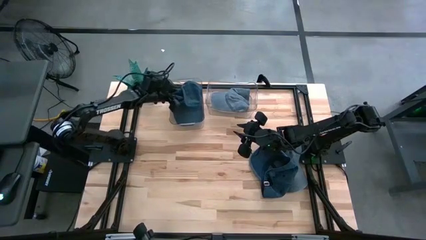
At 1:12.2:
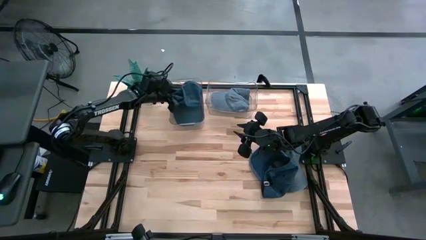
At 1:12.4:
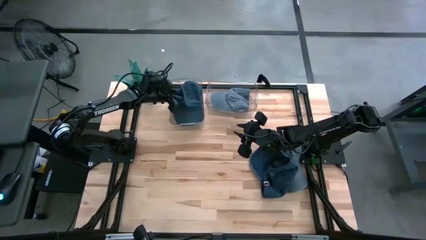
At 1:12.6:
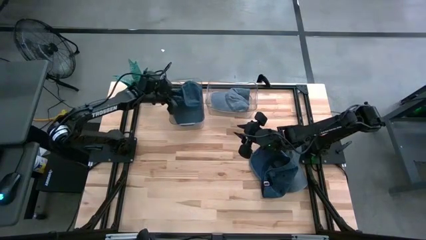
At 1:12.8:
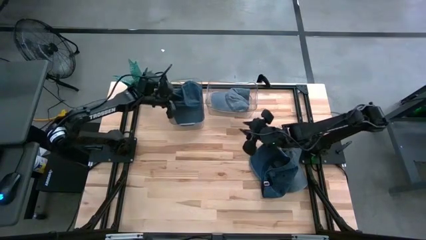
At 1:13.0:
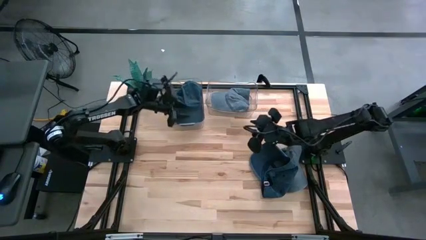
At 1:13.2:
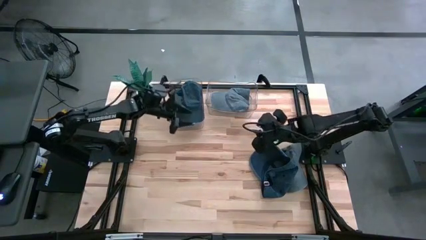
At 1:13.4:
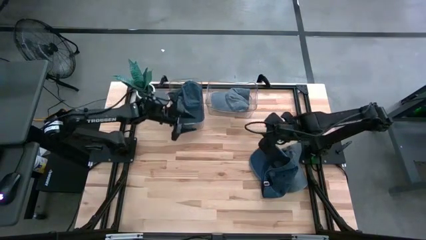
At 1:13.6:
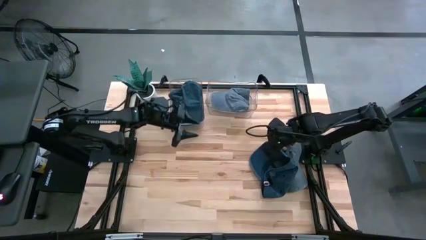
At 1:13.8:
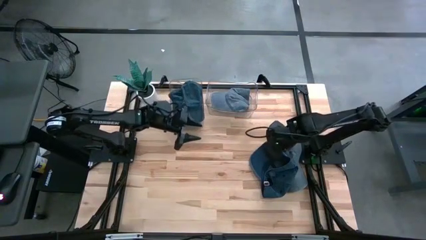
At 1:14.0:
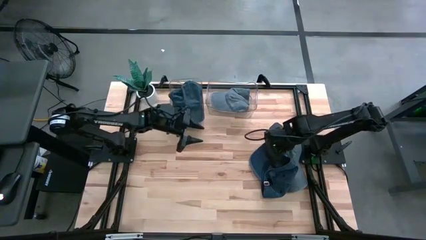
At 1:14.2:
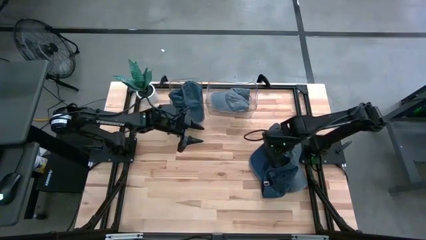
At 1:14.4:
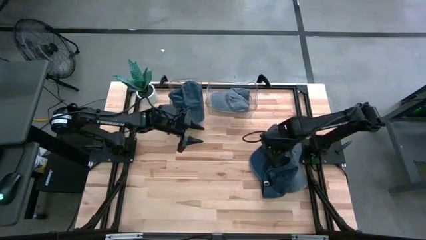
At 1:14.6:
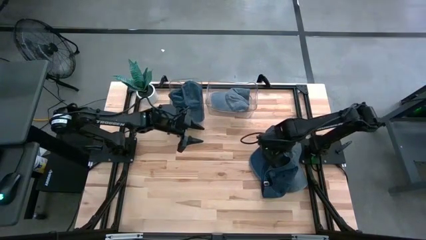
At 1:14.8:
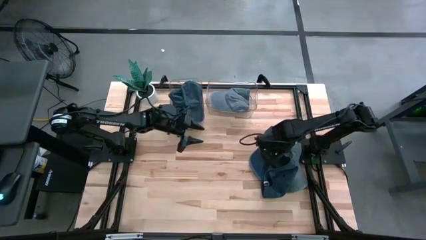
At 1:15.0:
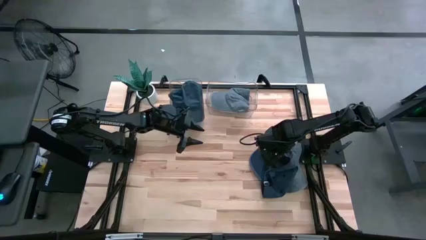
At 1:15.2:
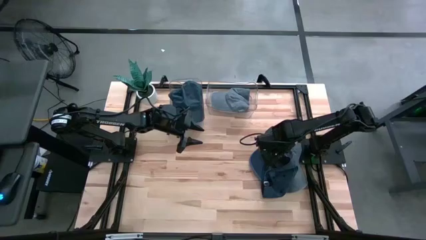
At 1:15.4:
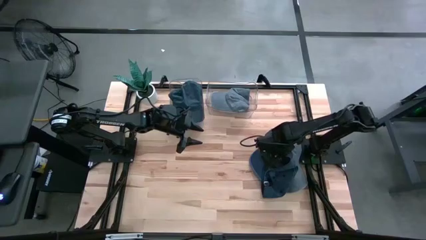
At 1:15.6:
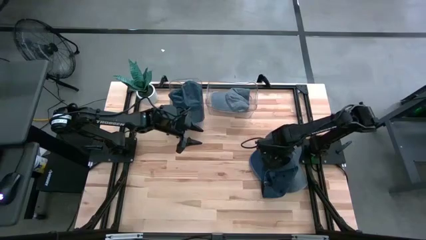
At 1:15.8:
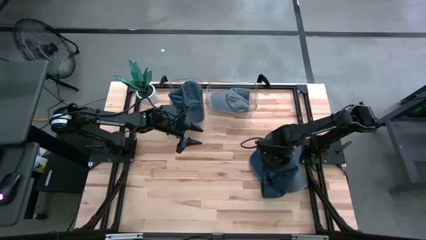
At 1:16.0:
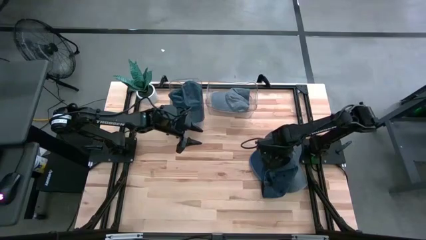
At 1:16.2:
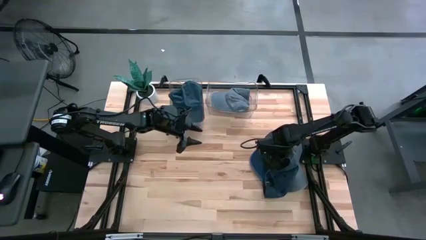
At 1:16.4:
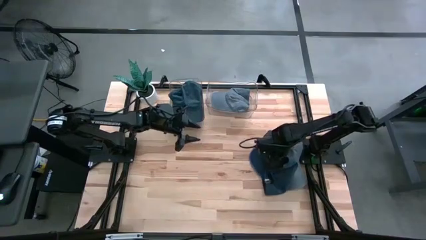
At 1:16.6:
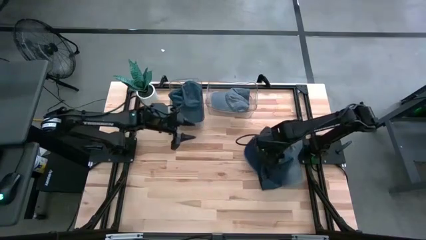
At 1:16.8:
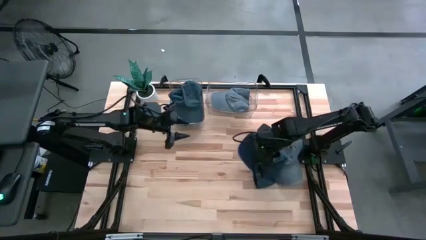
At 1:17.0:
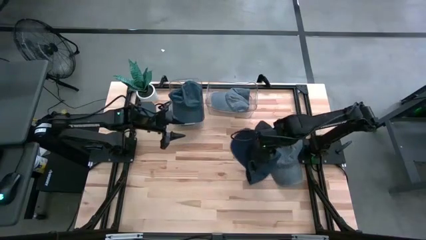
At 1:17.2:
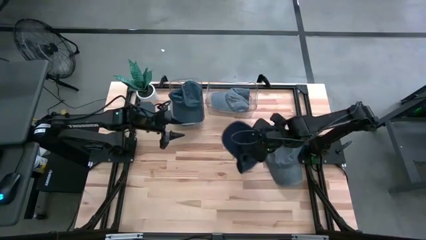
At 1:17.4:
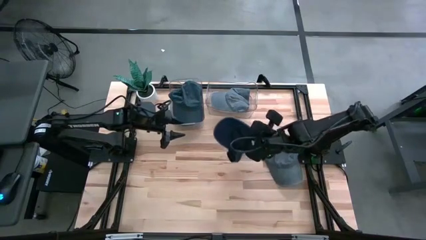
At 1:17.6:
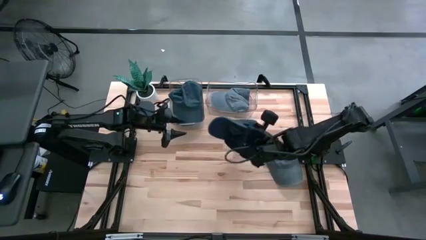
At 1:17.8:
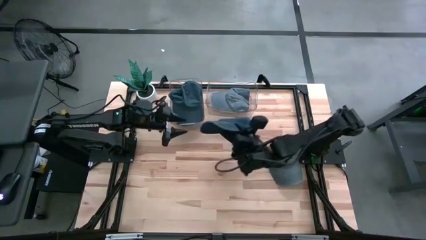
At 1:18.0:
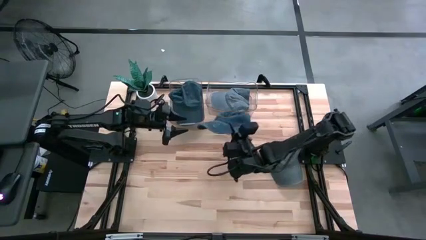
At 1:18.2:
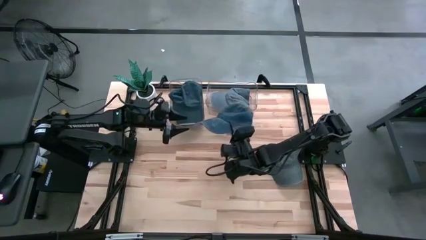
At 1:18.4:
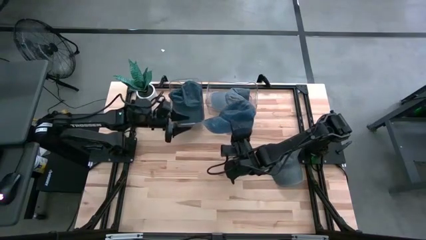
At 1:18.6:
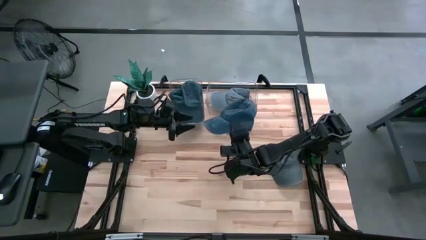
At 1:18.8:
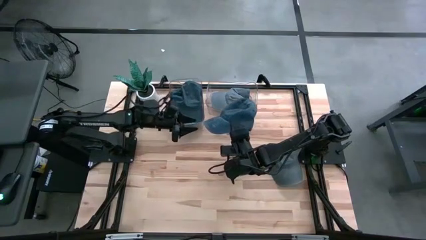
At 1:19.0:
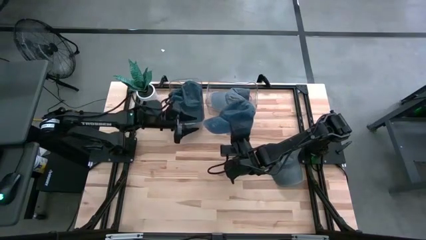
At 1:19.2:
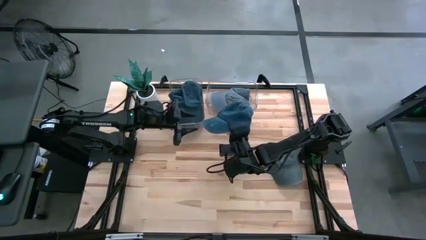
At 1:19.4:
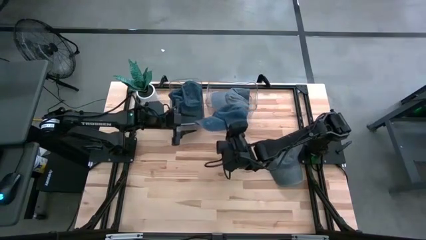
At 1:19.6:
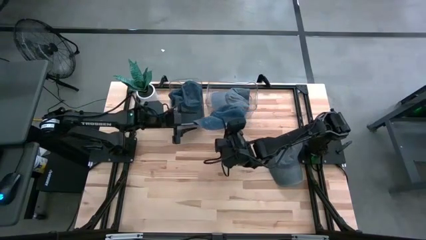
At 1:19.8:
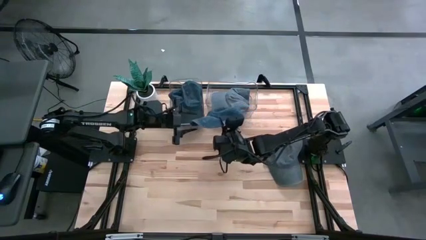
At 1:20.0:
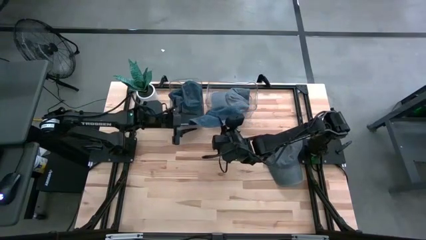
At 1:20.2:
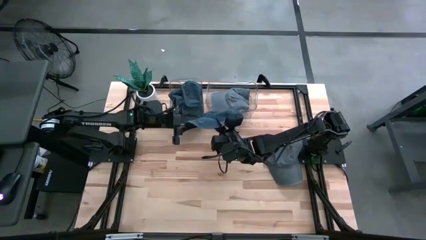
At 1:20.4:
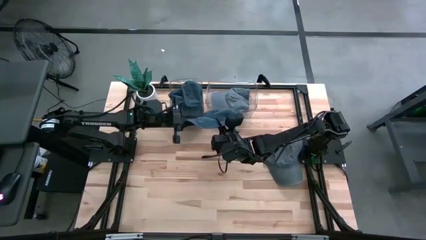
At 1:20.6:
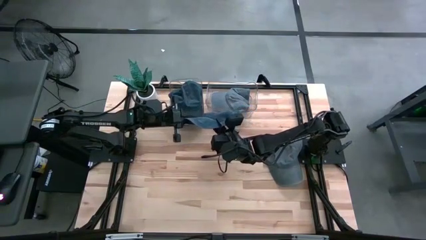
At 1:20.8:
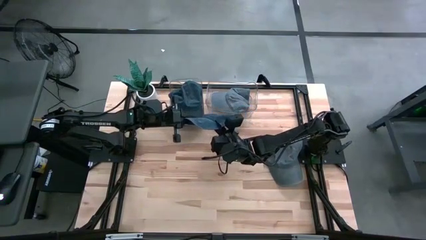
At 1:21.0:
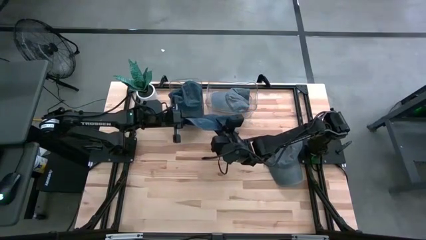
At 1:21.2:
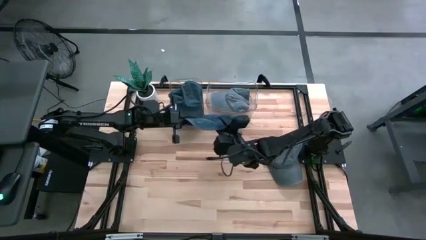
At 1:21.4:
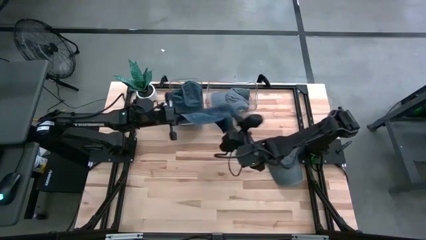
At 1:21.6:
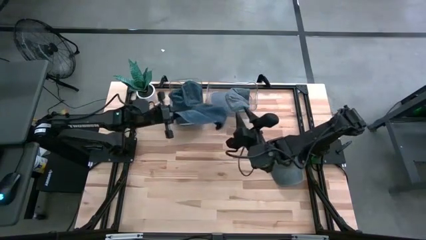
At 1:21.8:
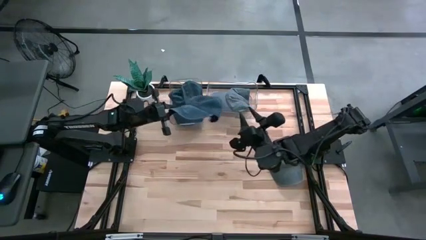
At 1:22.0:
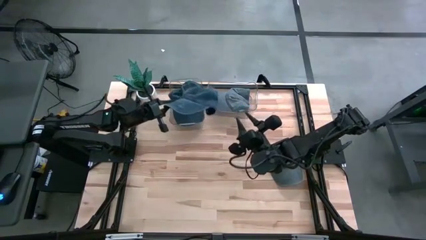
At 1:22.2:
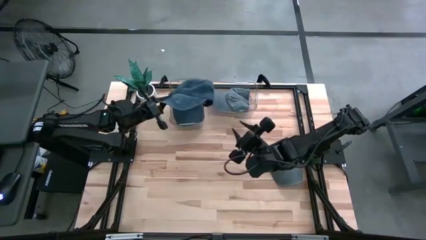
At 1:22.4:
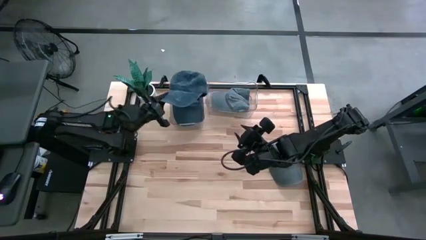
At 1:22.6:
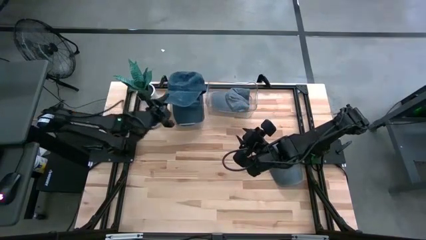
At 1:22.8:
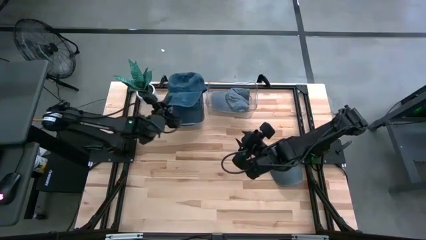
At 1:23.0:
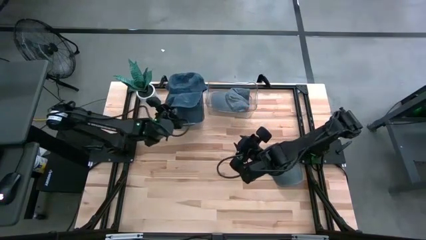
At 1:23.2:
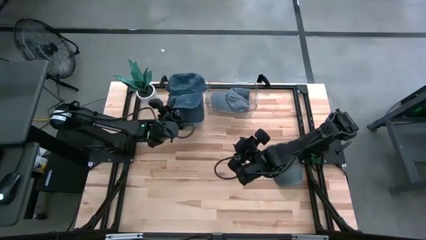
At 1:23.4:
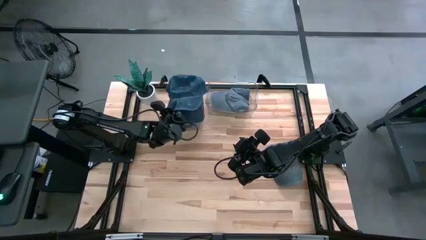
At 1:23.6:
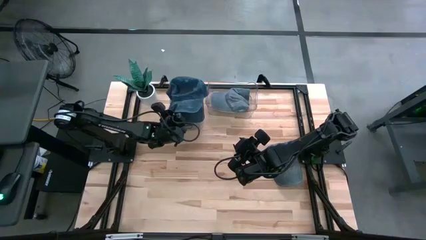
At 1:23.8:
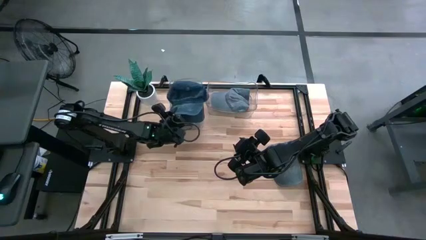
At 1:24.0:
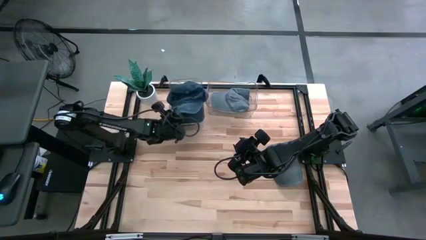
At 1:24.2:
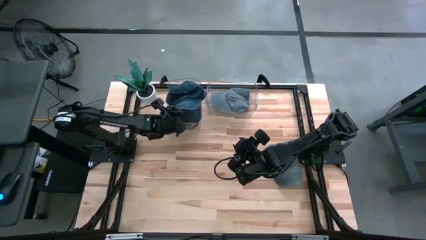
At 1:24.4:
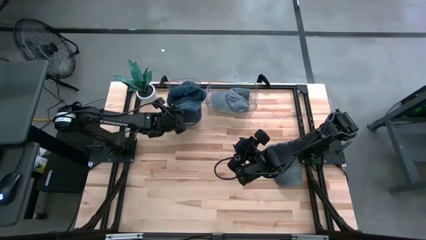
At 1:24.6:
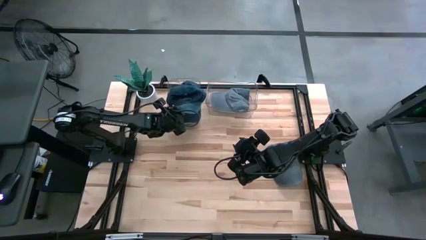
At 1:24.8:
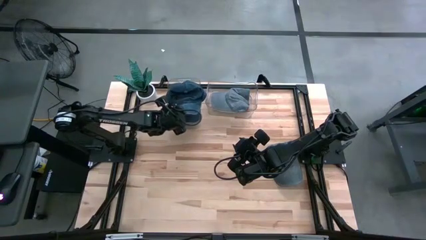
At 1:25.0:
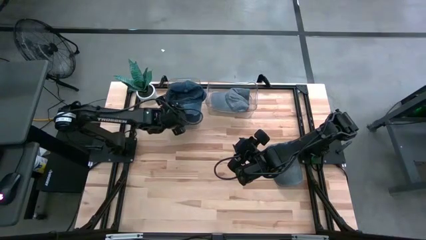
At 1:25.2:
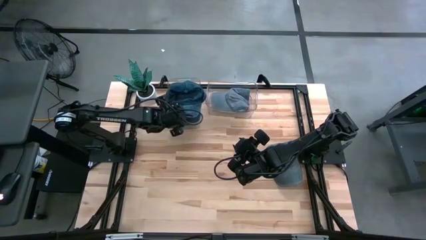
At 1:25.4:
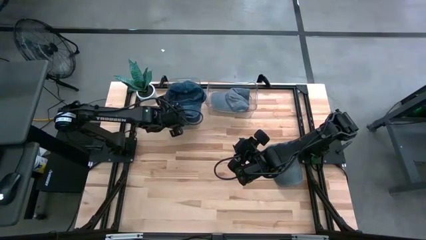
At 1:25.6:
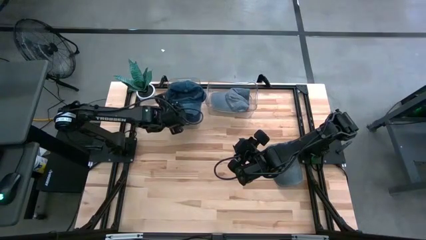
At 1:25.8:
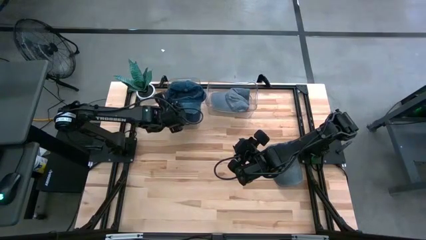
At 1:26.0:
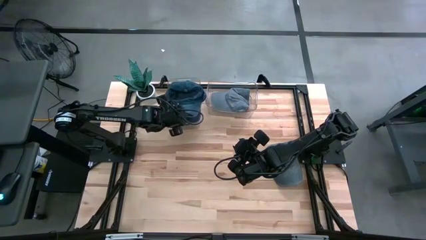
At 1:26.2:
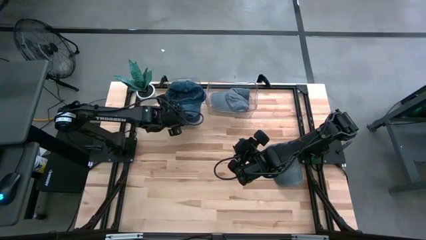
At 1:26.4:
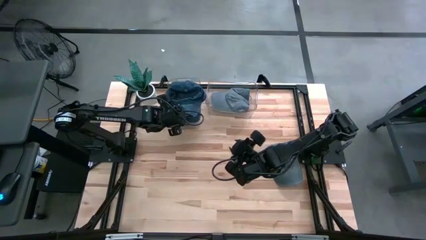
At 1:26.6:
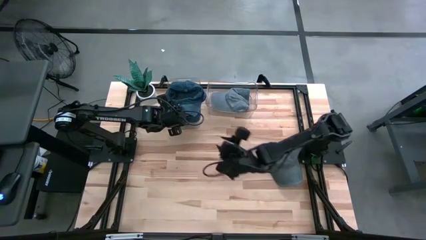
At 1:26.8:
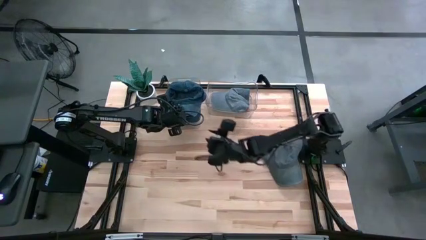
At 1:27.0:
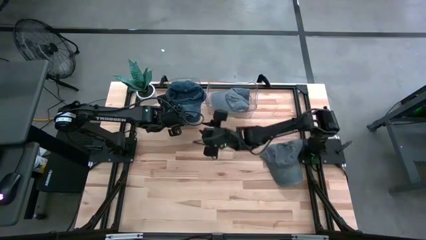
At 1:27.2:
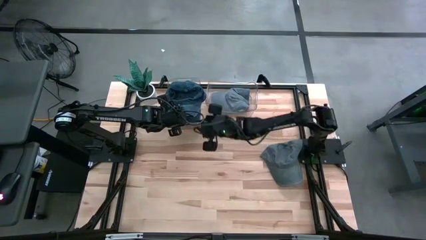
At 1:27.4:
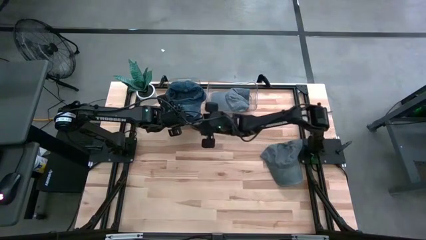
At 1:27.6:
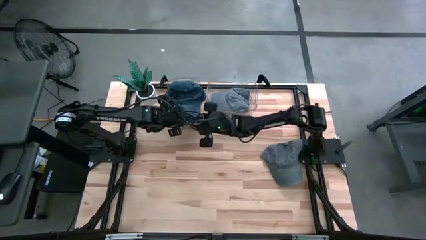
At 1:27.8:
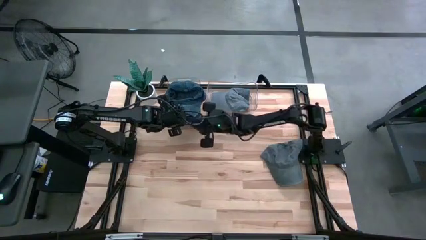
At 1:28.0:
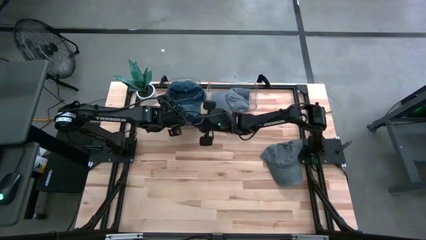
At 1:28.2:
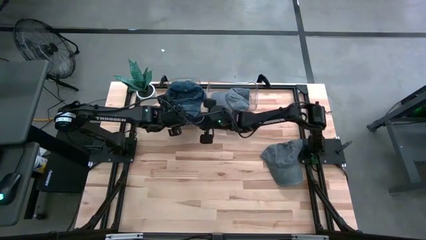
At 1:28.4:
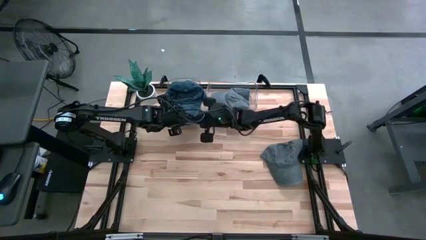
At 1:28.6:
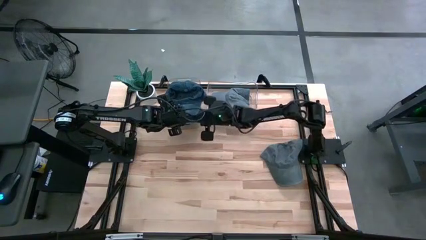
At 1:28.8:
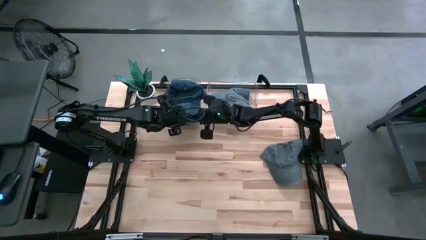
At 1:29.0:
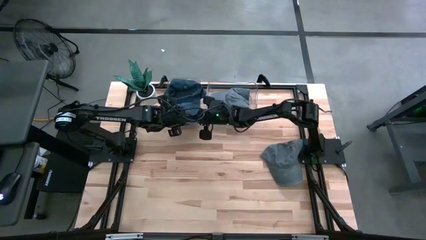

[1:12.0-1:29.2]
Task: Pick & Place hat
Put the blue cap into the left transparent bin
